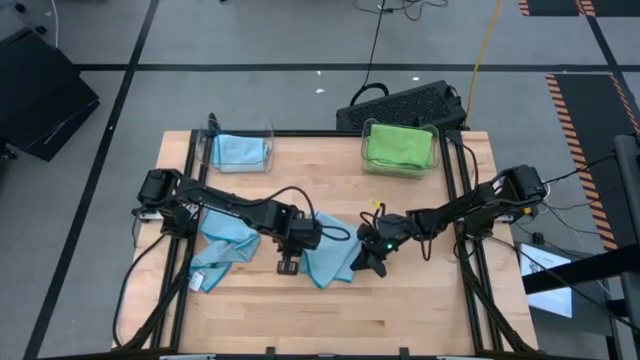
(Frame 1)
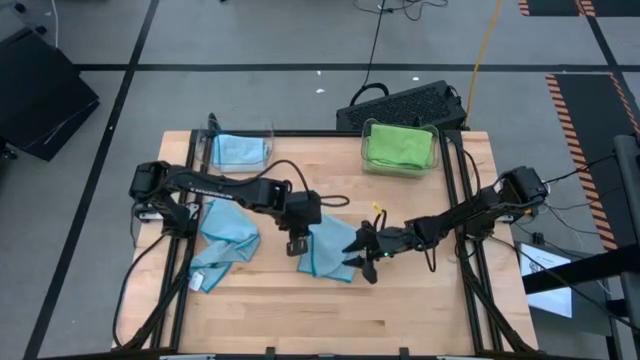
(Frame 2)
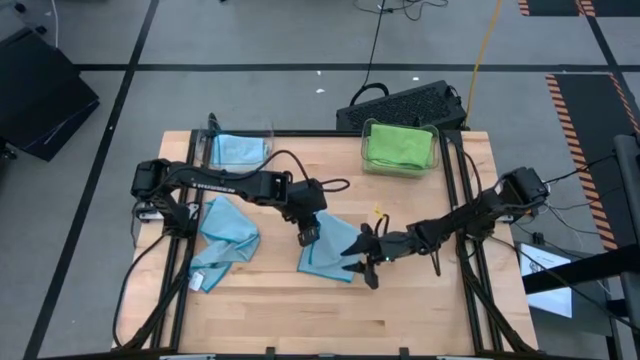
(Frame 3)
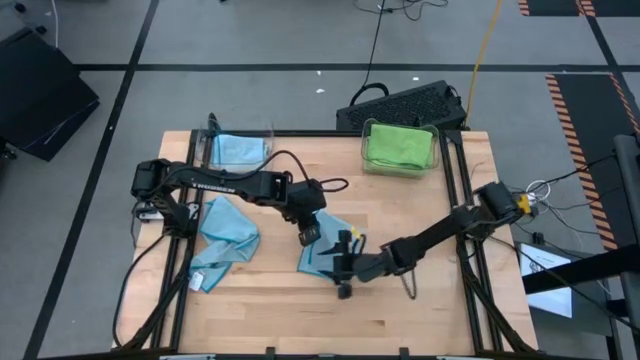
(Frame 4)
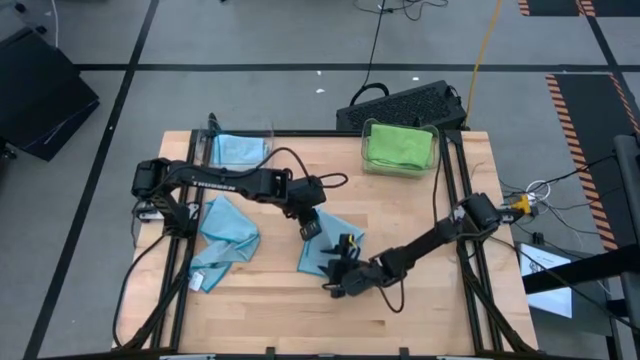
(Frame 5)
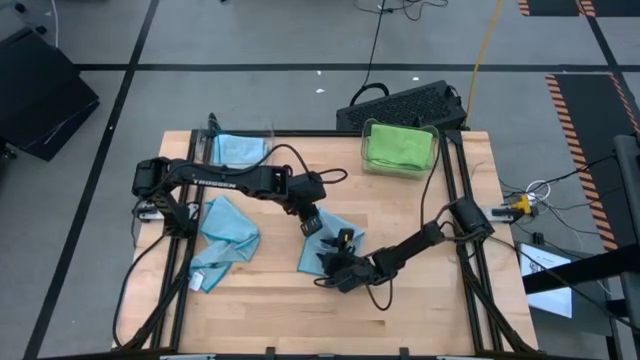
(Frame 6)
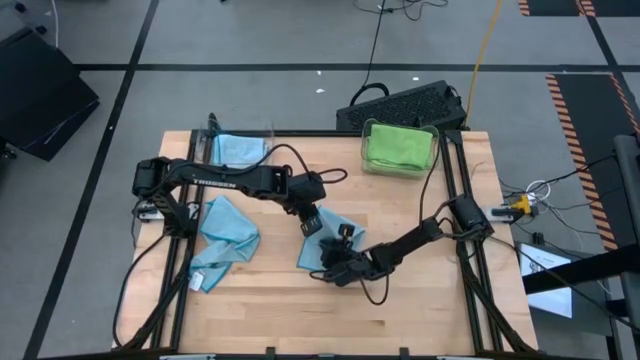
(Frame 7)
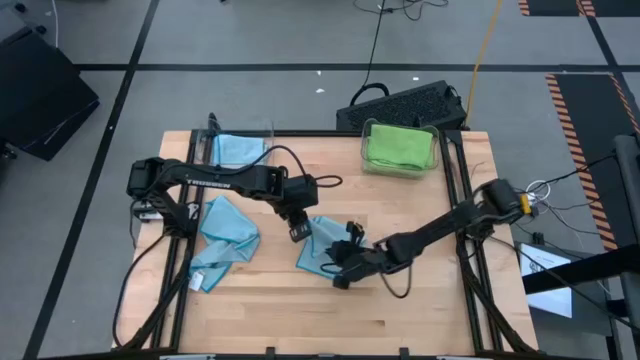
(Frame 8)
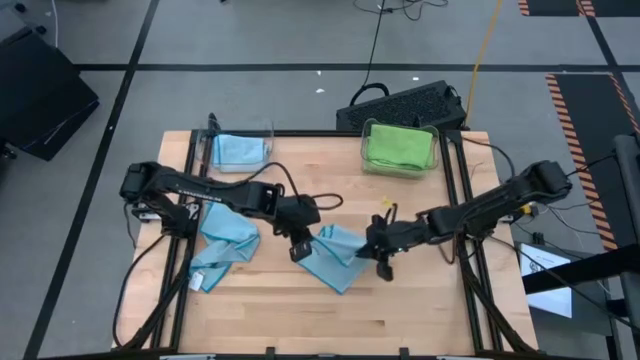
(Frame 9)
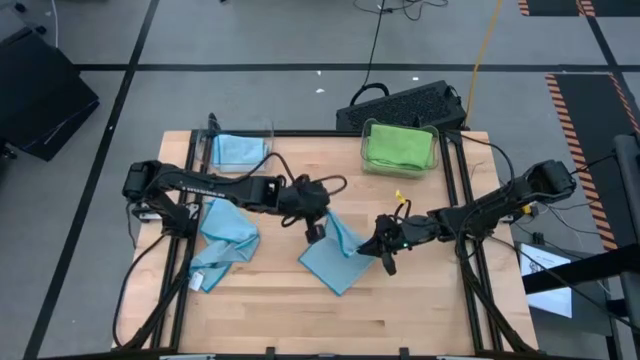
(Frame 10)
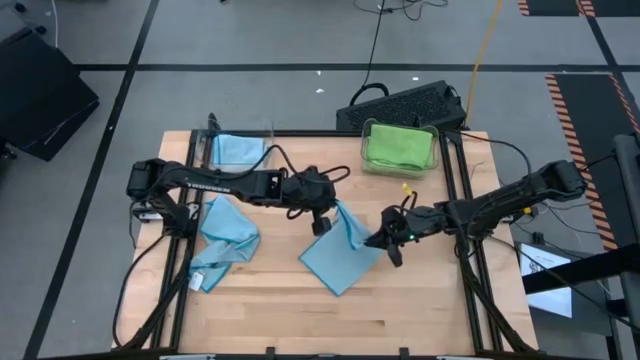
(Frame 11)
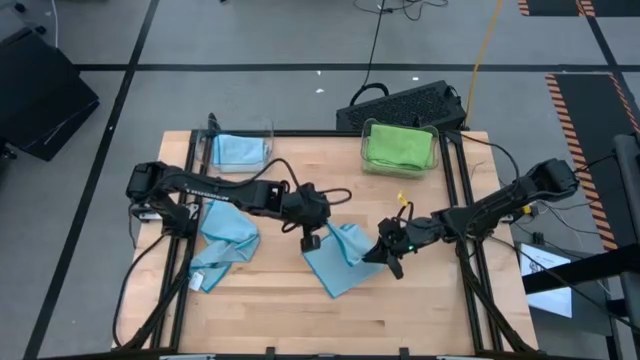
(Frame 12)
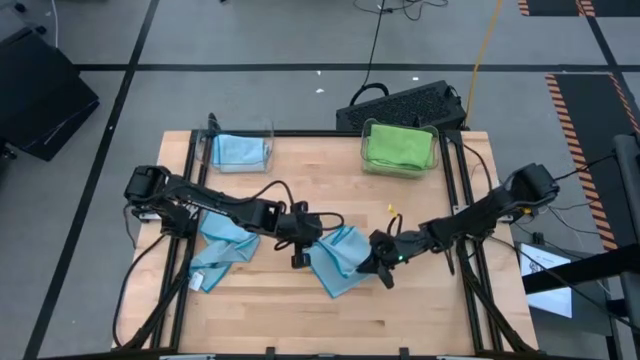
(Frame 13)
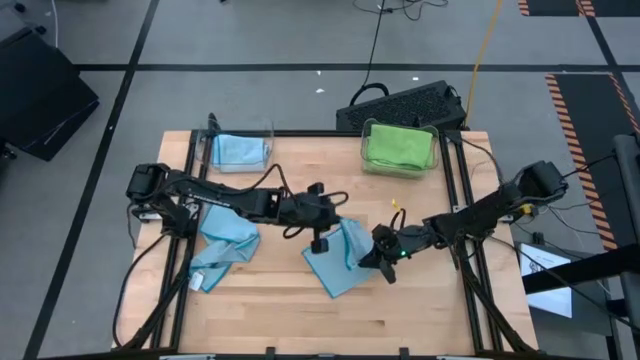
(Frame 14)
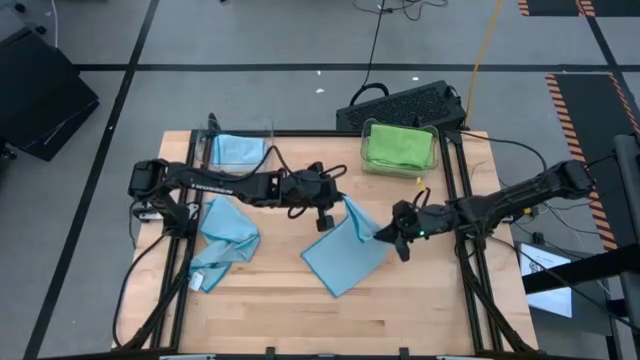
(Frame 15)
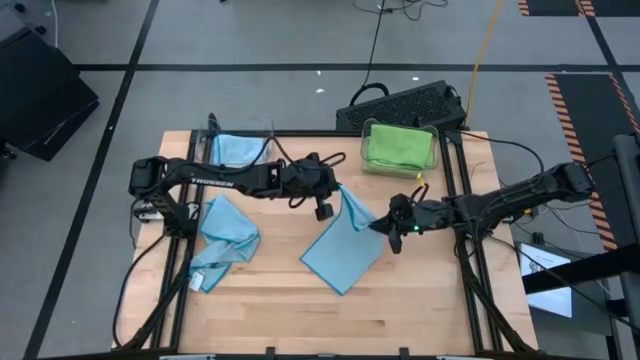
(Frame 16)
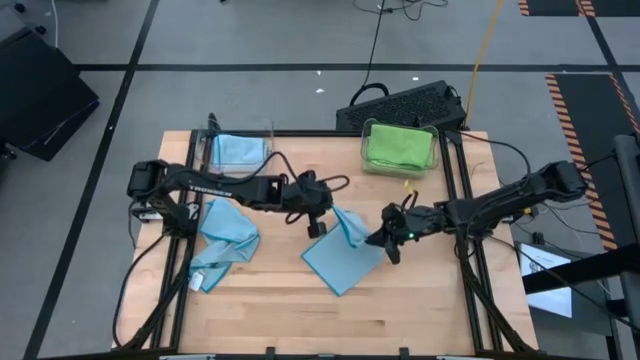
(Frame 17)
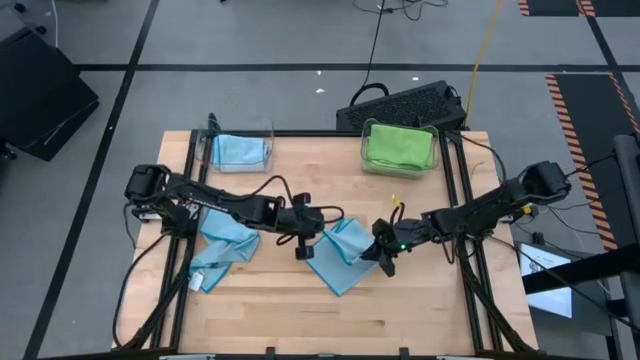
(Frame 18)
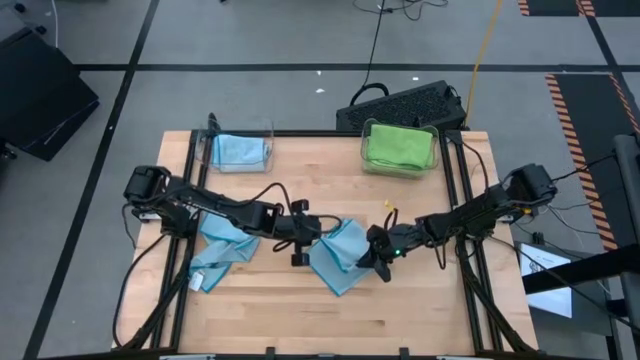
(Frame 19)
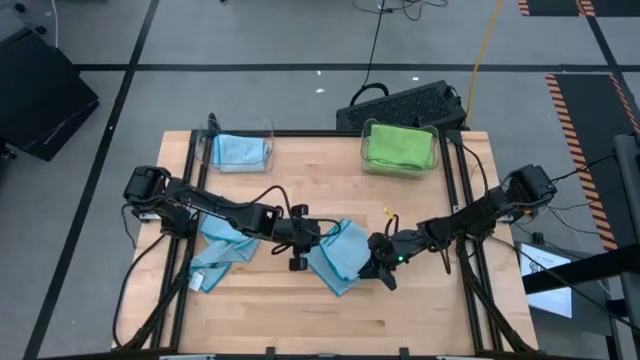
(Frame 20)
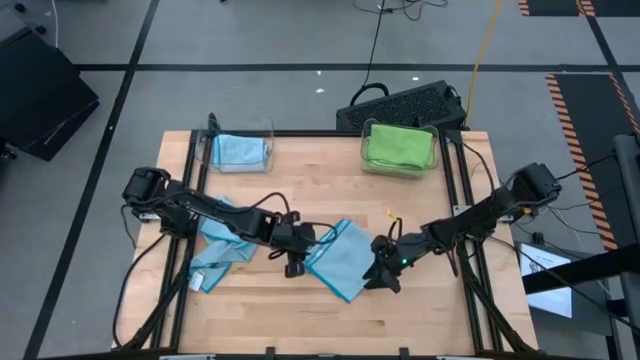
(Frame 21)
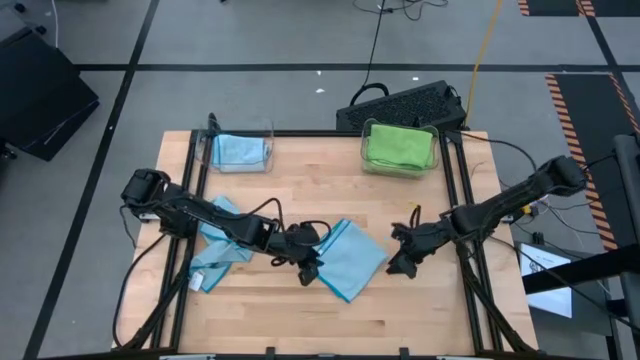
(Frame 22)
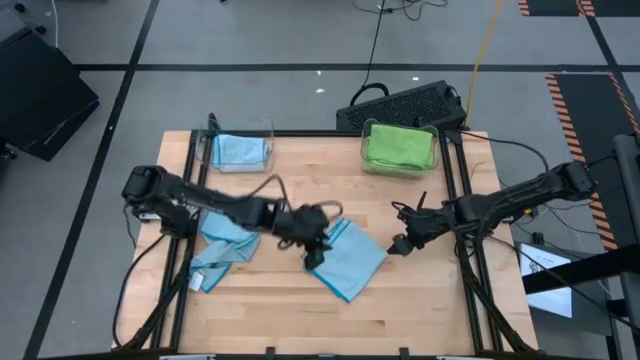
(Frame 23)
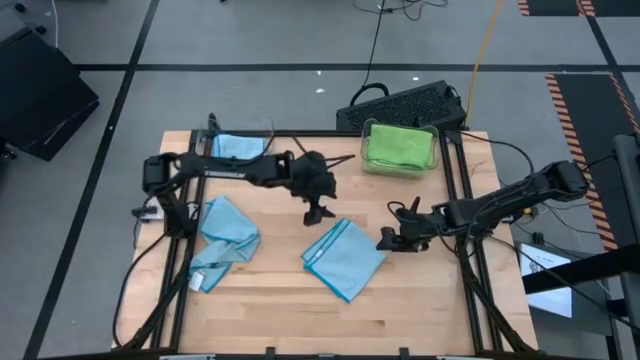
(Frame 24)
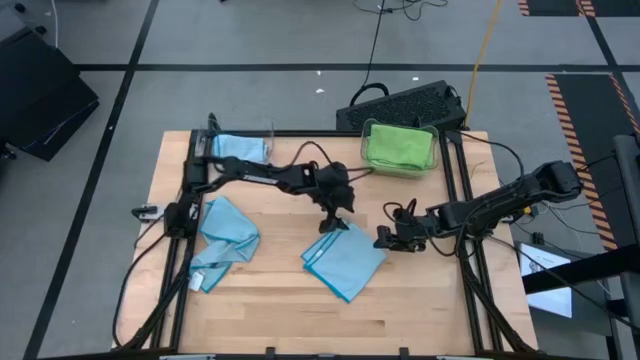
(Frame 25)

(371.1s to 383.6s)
Task: Sort microfiber towel by color & place in baskets
Fold the right blue towel

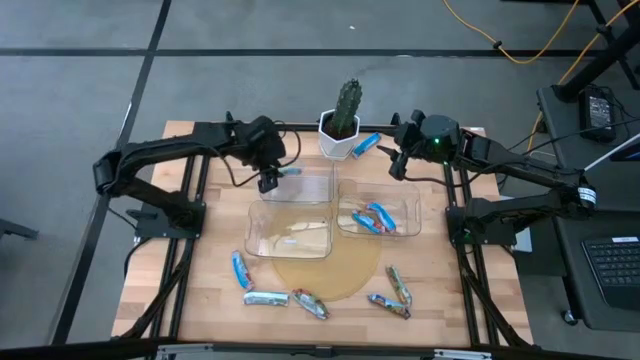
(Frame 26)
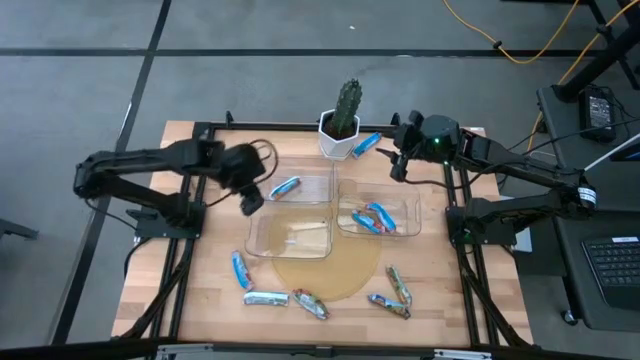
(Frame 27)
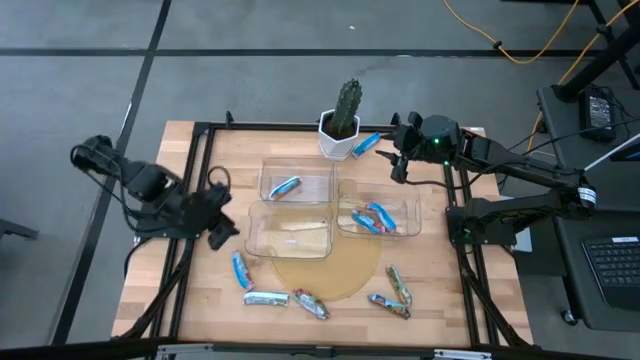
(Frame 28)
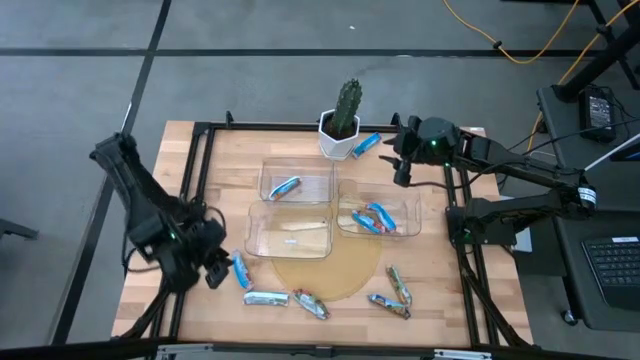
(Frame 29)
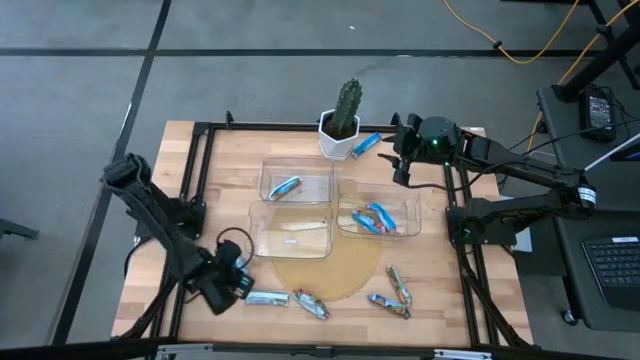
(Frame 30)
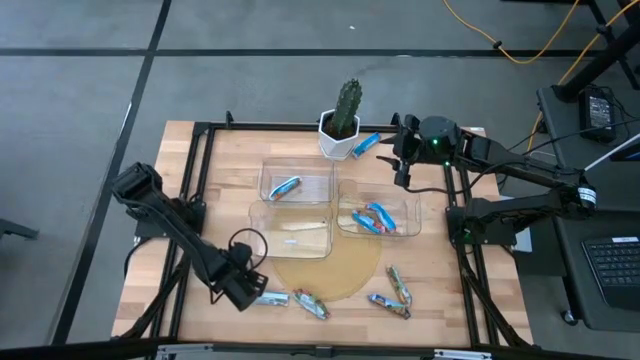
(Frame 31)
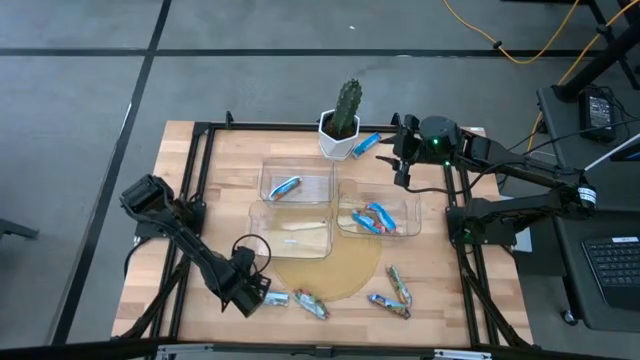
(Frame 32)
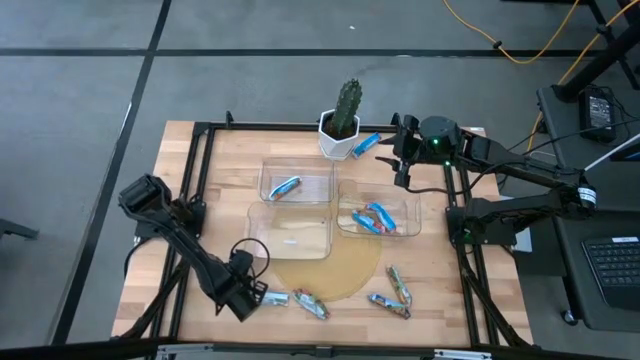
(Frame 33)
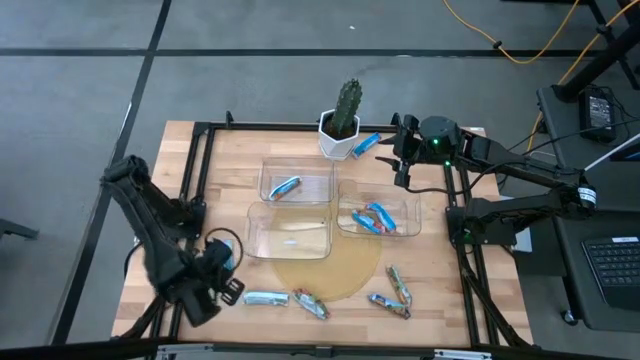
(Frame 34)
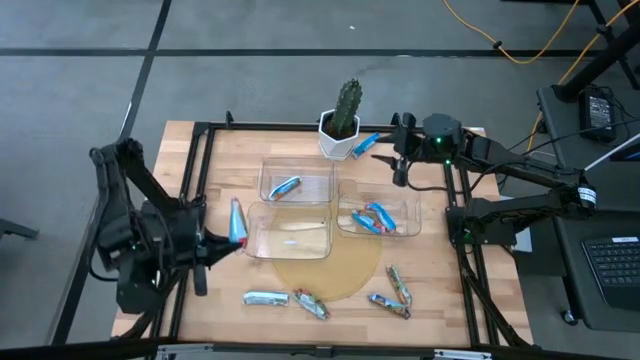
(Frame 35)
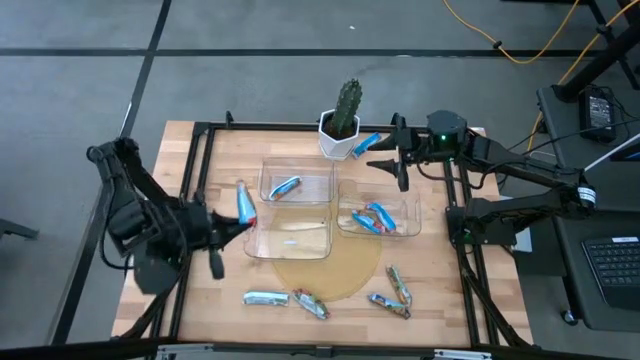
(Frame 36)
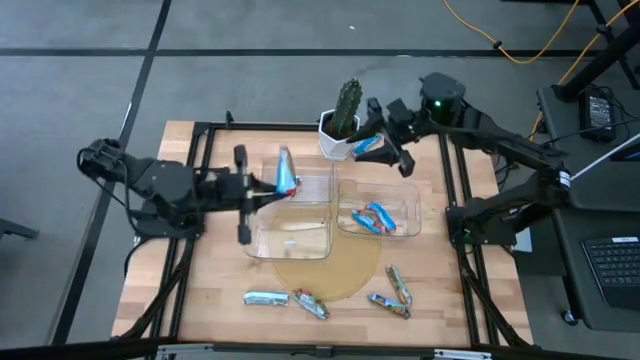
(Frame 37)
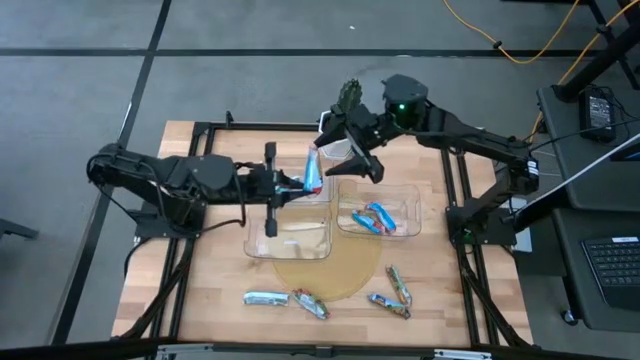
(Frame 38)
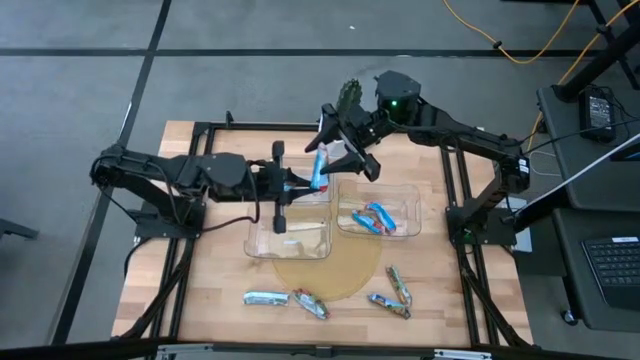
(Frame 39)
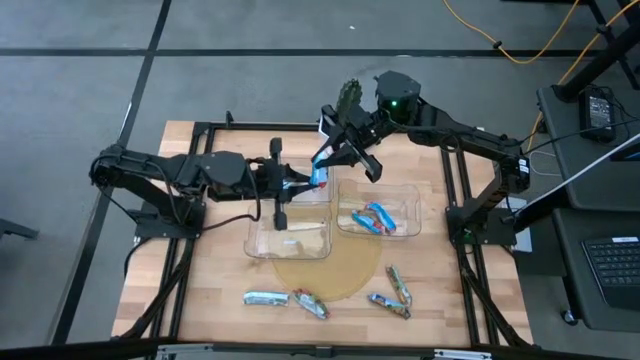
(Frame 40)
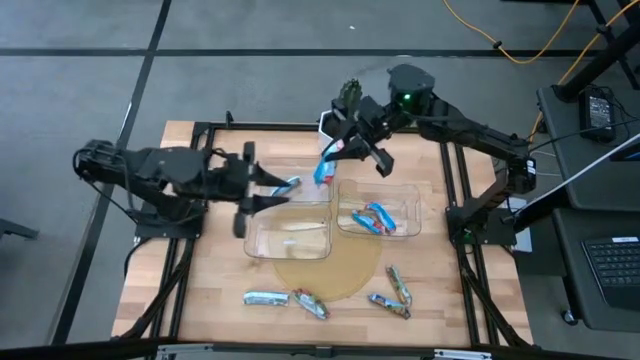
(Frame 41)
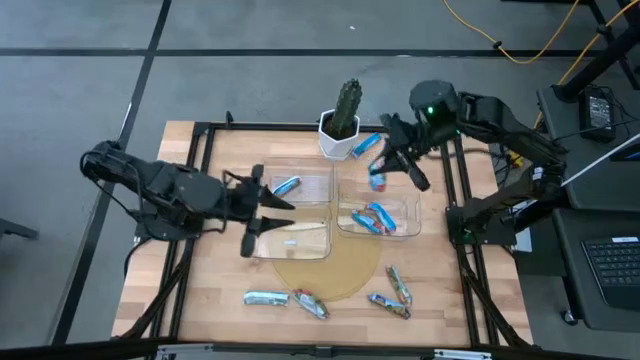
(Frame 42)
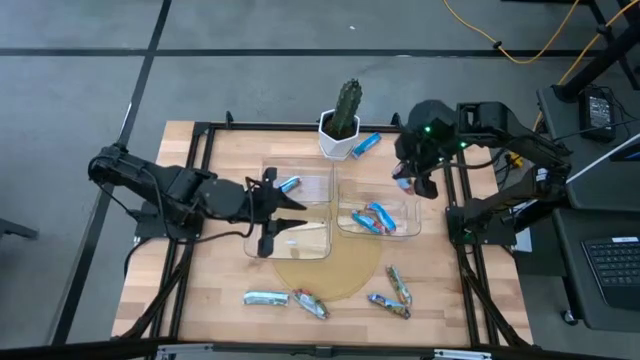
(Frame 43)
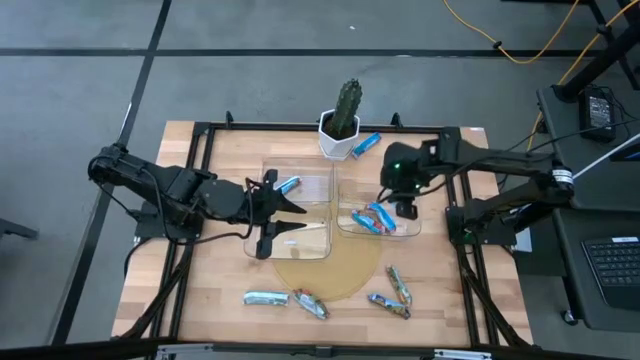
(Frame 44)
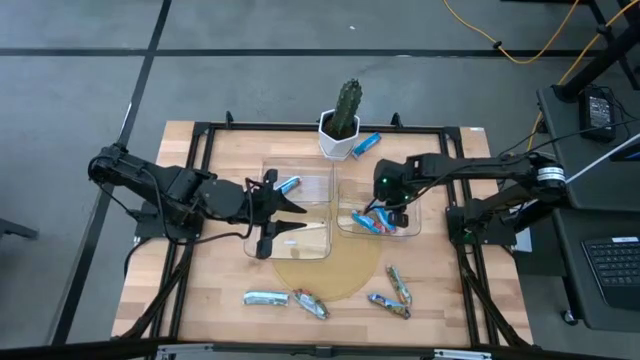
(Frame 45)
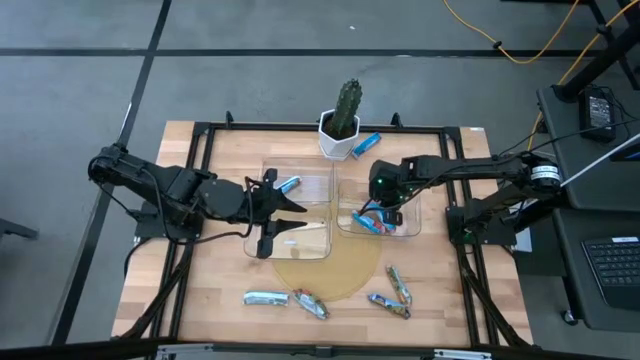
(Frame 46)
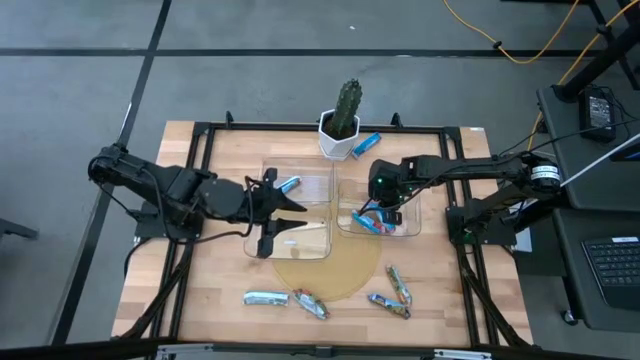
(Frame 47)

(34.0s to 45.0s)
Task: Pick and place Granola Bars by type
Put the left red granola bar into the right bin
